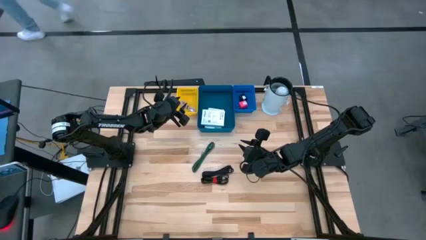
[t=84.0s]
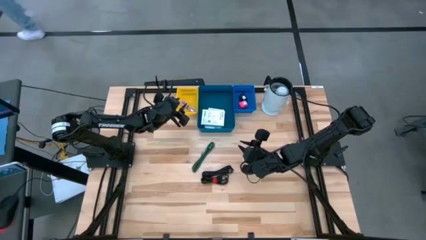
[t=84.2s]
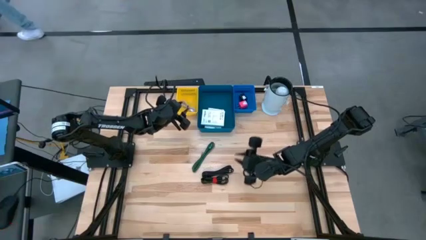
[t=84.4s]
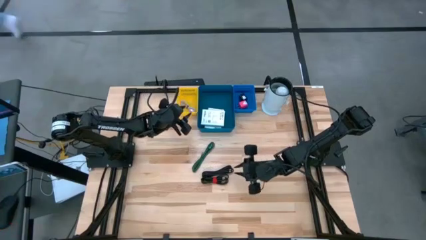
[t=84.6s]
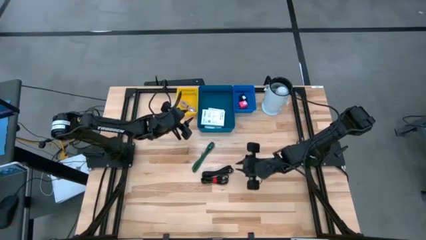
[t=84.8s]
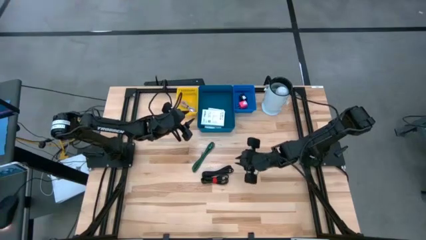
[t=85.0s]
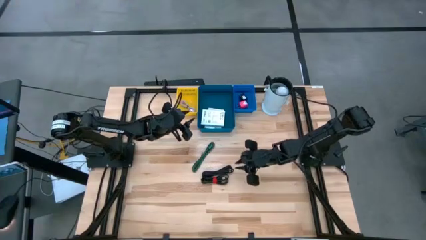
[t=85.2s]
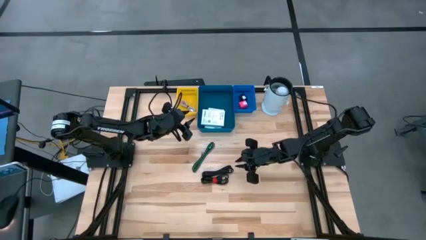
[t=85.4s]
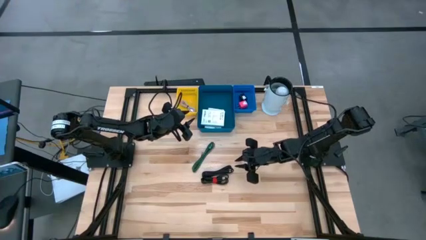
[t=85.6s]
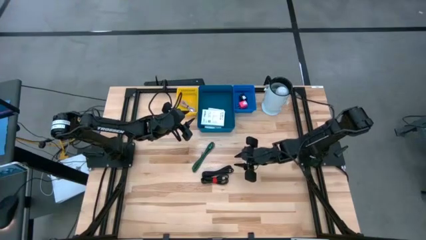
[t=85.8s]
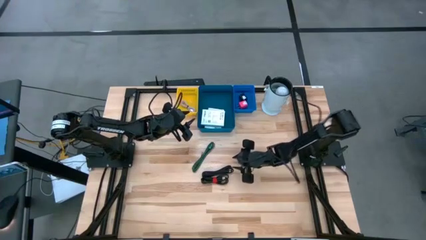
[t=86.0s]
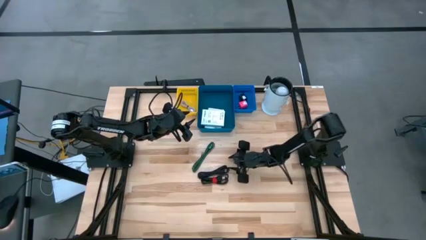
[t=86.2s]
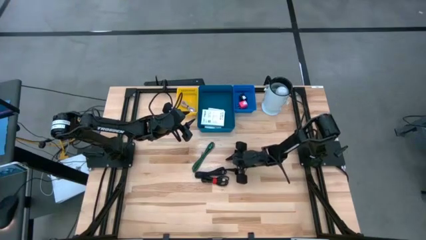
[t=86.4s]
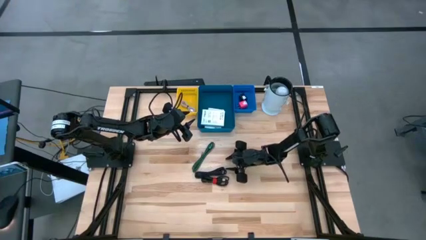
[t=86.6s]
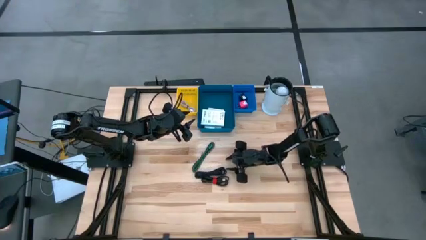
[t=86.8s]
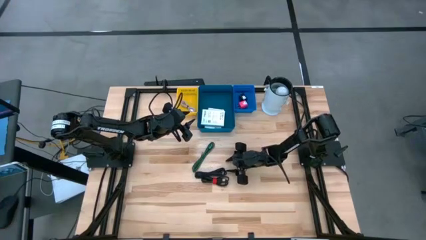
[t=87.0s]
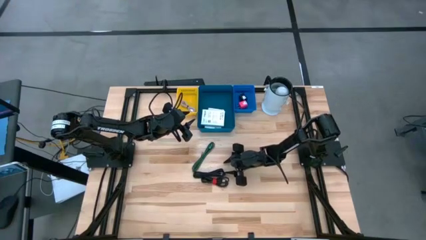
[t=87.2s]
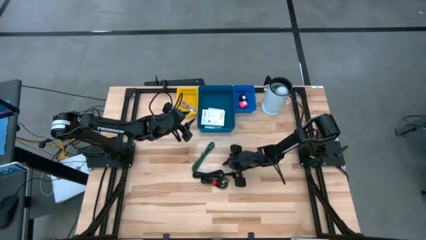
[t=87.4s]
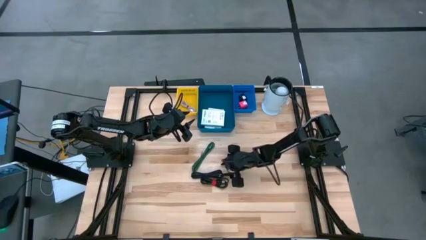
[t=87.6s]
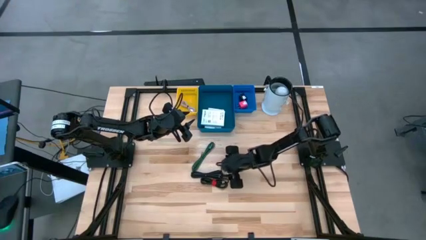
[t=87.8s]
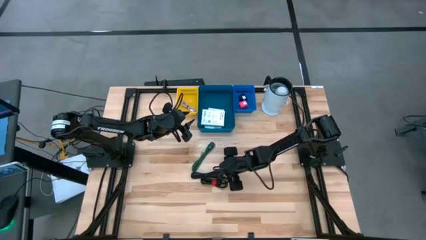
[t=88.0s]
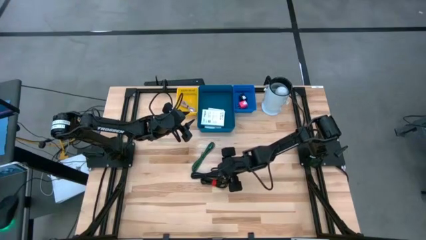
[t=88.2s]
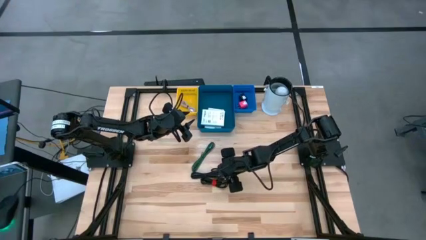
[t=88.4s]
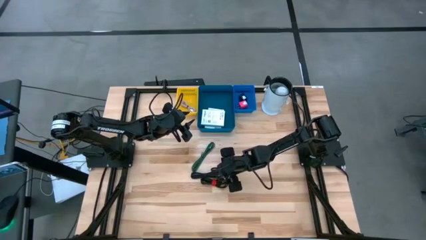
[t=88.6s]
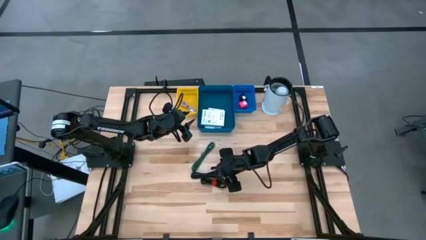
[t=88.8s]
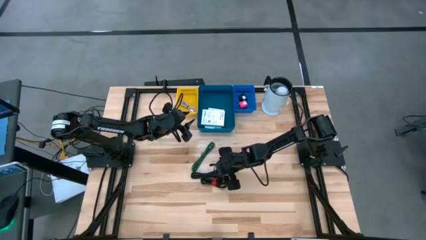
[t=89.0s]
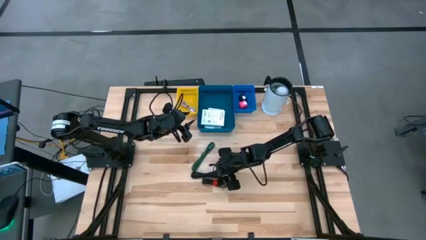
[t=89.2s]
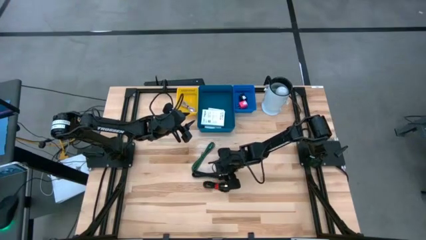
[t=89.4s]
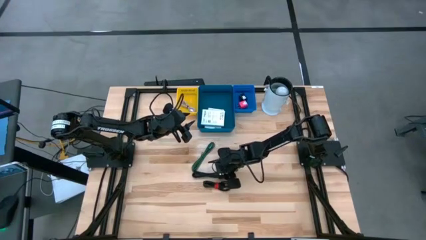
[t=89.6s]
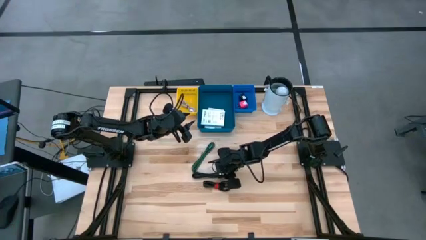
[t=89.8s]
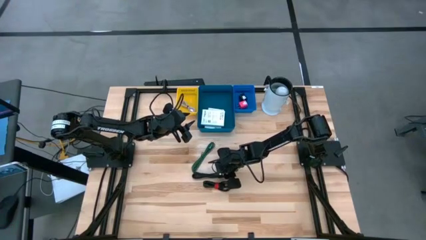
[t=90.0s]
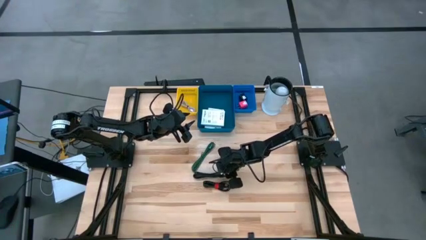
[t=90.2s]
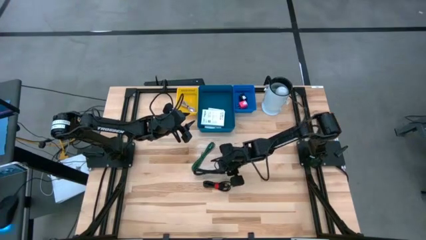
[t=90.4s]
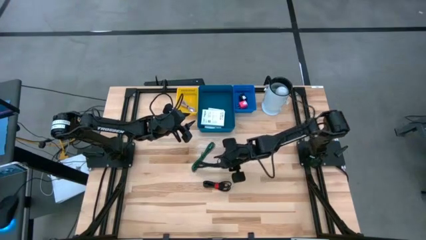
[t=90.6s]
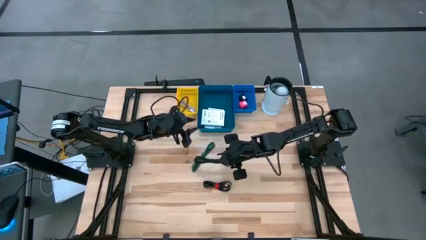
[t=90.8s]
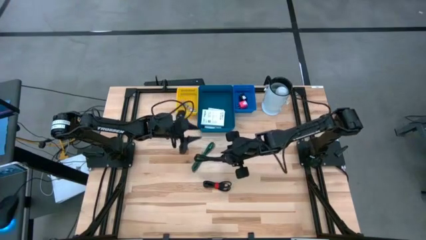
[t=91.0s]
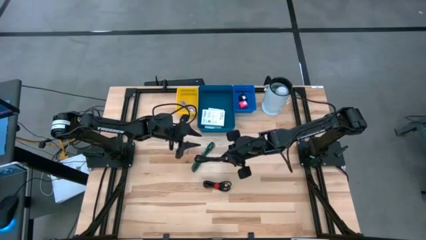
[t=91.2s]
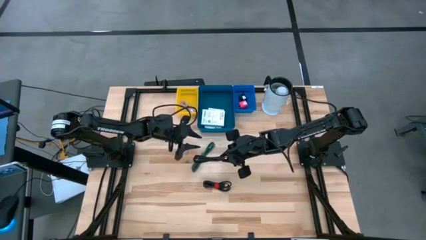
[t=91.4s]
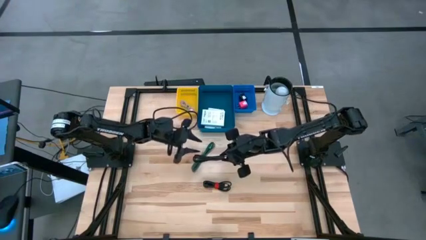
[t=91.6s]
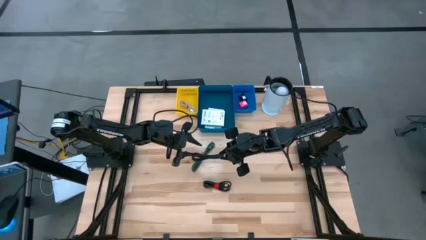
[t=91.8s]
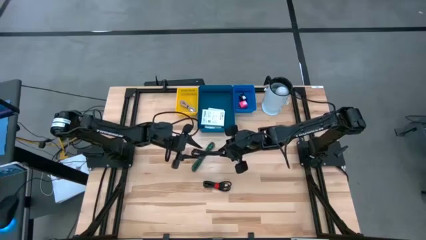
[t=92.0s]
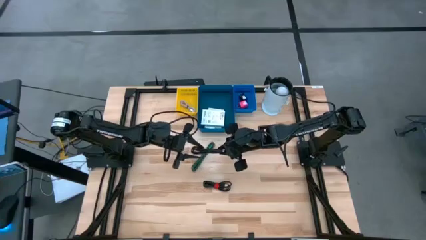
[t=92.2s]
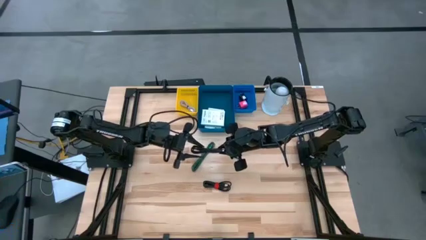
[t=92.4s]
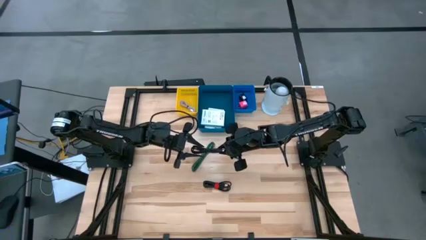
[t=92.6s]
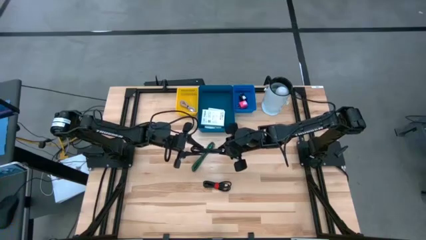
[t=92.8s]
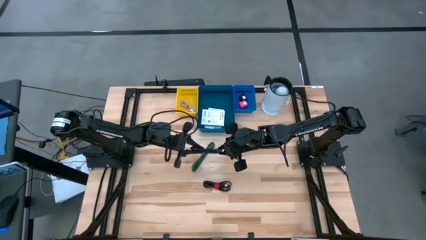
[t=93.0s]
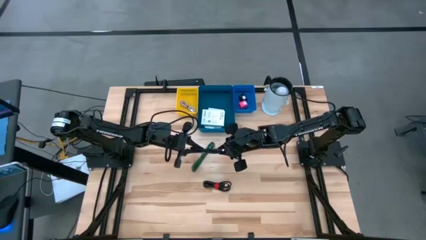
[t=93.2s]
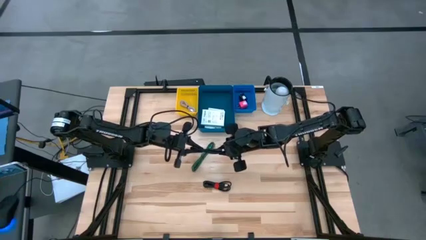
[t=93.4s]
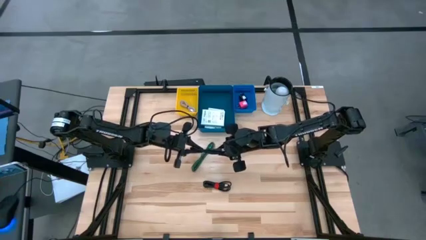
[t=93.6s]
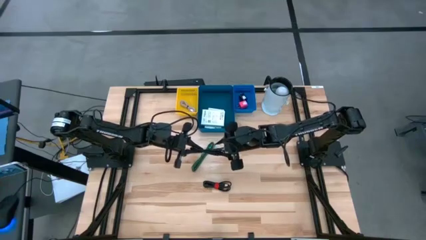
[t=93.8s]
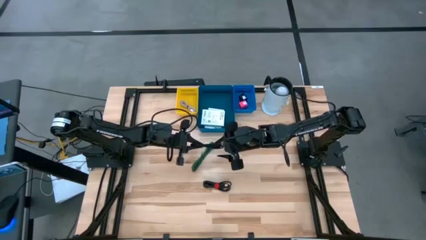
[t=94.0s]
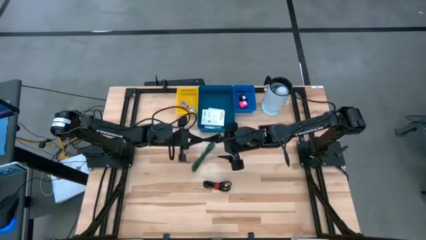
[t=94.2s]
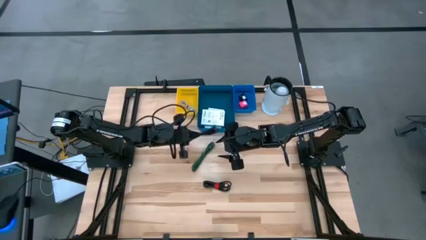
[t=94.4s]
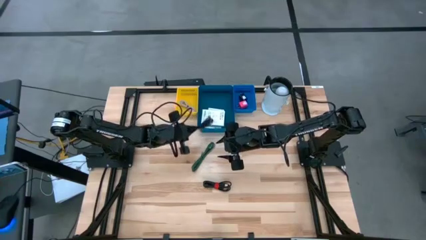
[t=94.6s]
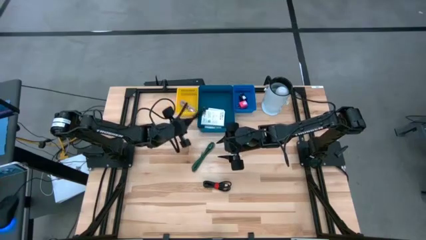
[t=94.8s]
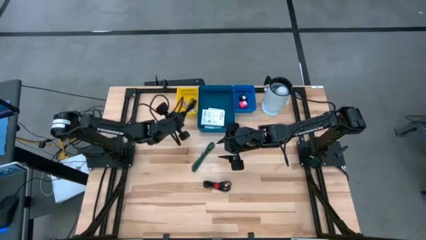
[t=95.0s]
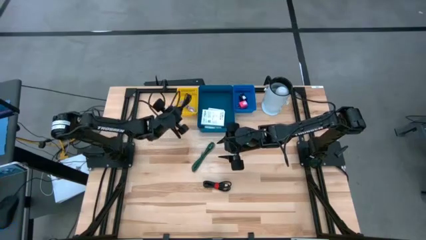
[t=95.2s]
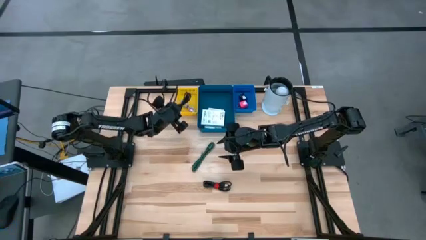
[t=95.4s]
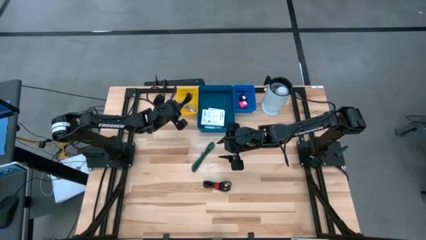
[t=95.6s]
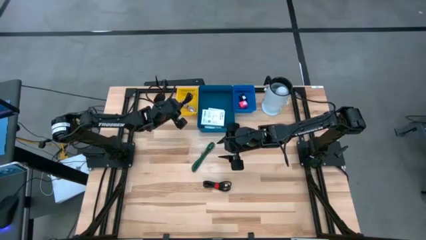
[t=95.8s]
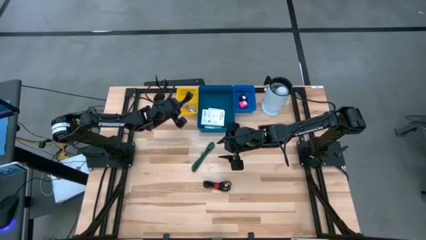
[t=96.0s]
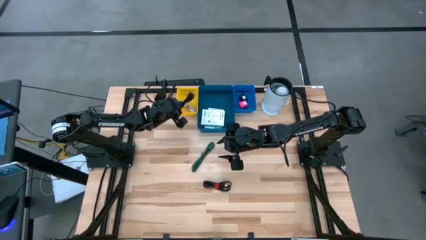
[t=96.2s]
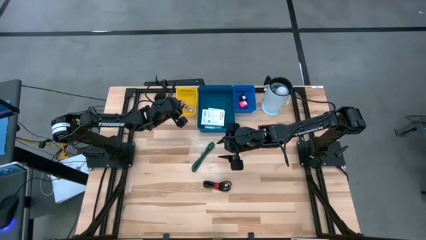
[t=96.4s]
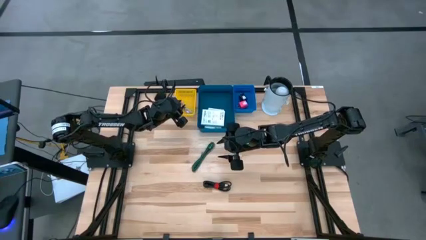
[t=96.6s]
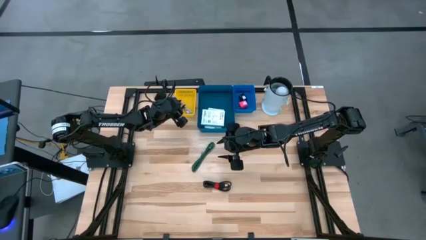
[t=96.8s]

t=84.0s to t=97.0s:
Task: Pick and place items into bin
Put the top black charger cable into the yellow bin
